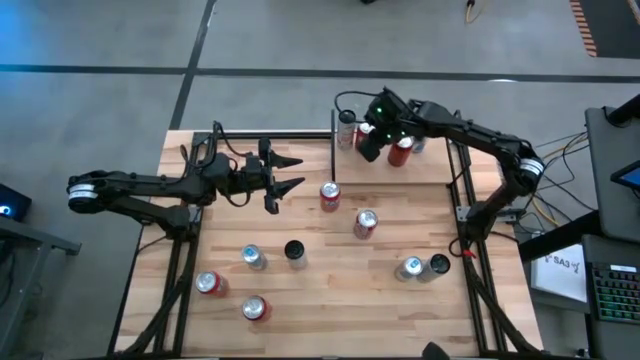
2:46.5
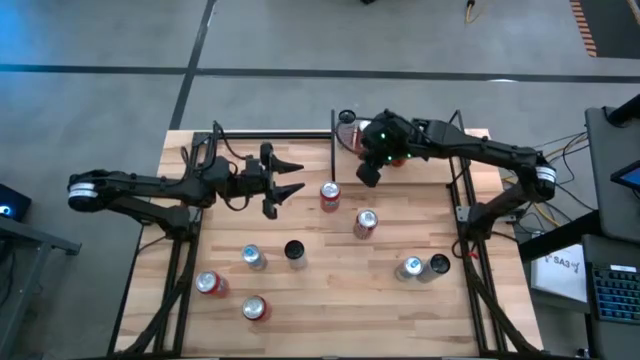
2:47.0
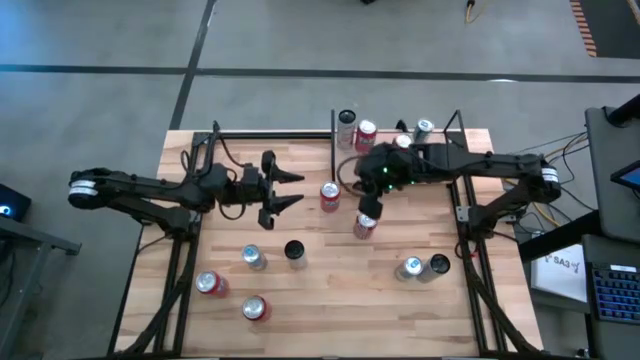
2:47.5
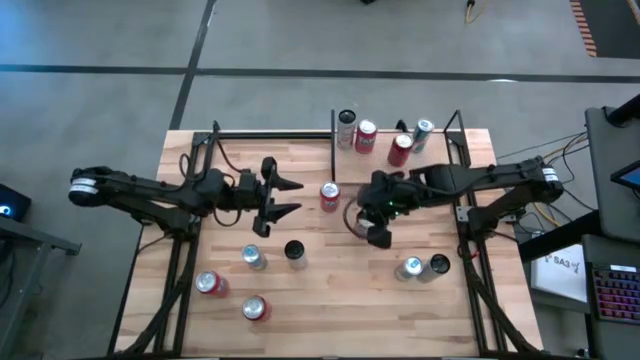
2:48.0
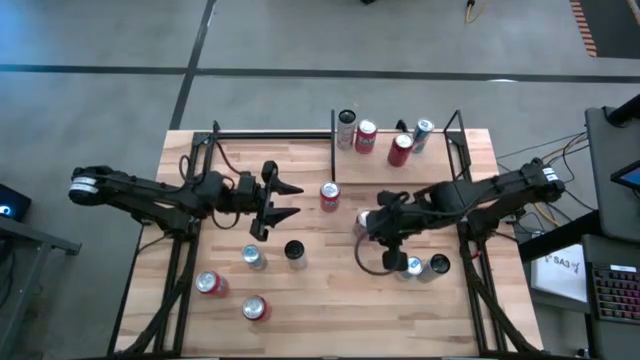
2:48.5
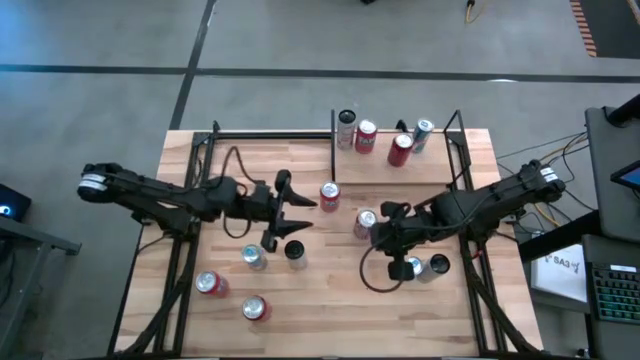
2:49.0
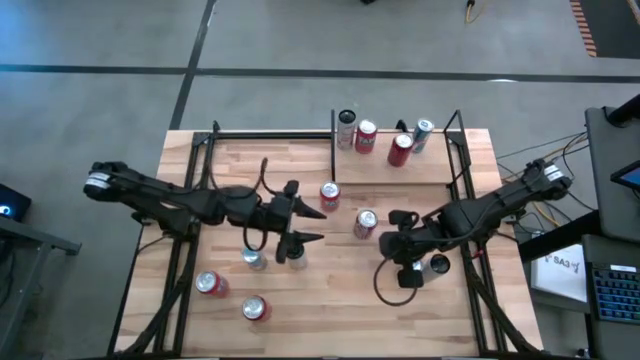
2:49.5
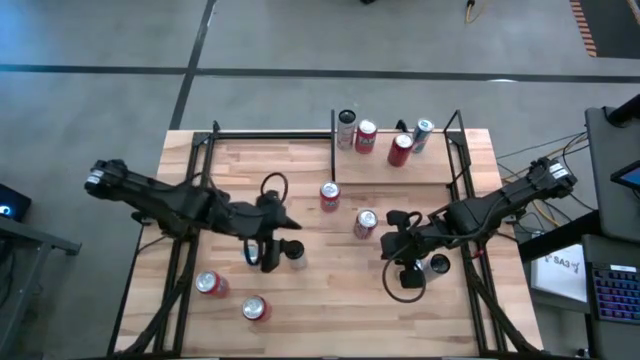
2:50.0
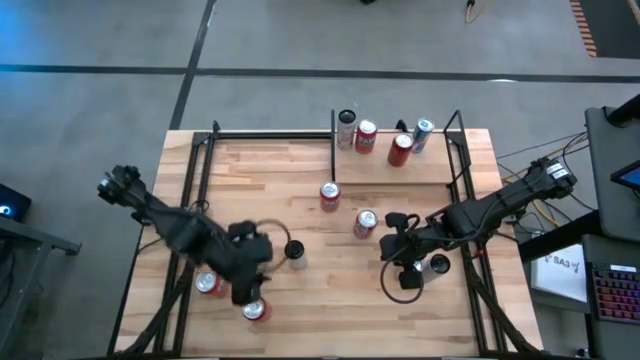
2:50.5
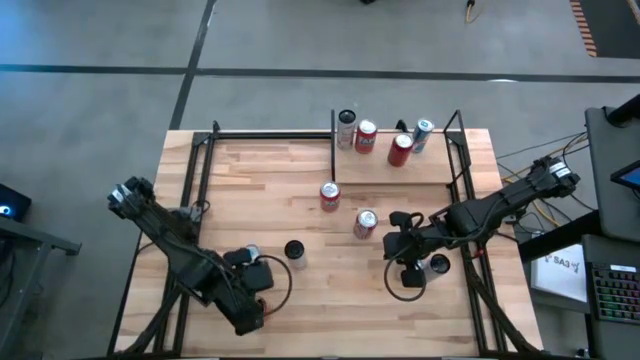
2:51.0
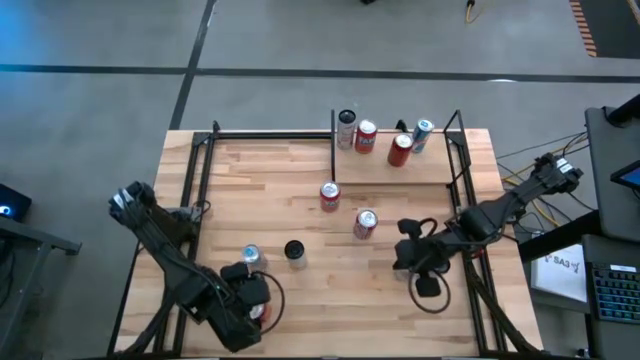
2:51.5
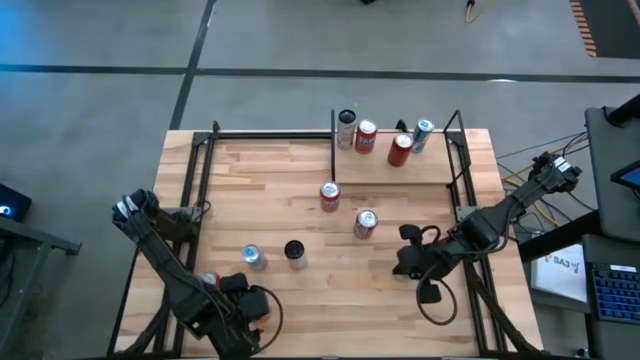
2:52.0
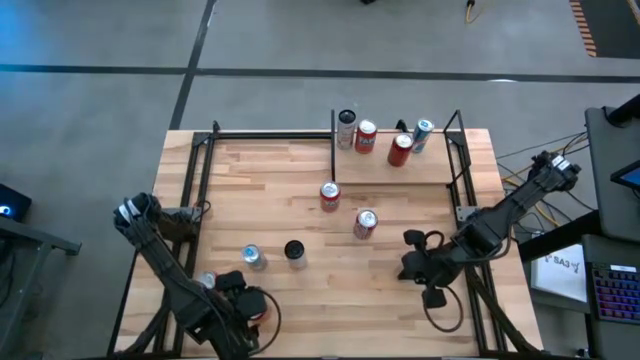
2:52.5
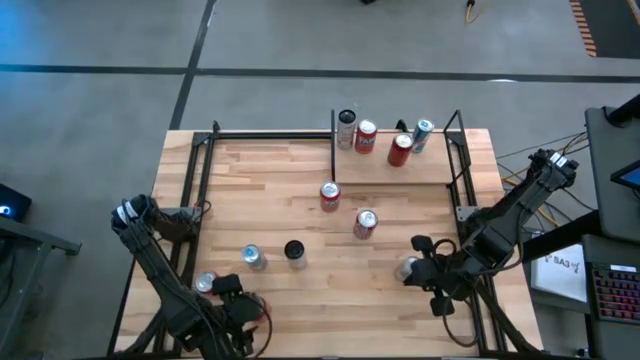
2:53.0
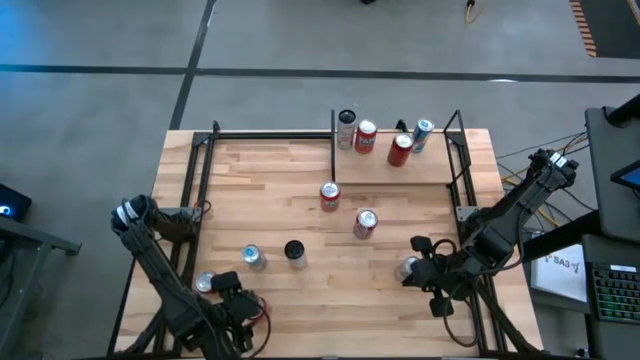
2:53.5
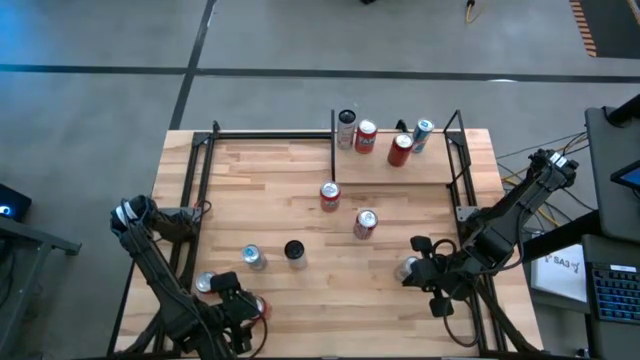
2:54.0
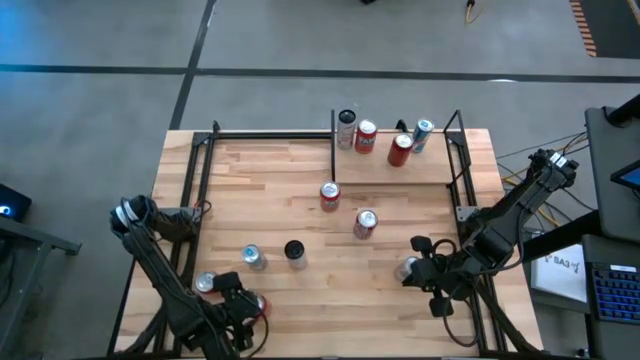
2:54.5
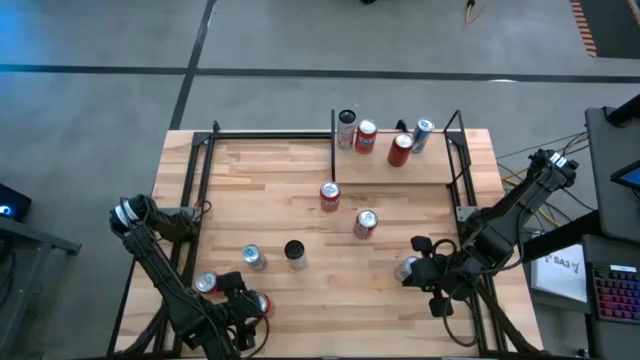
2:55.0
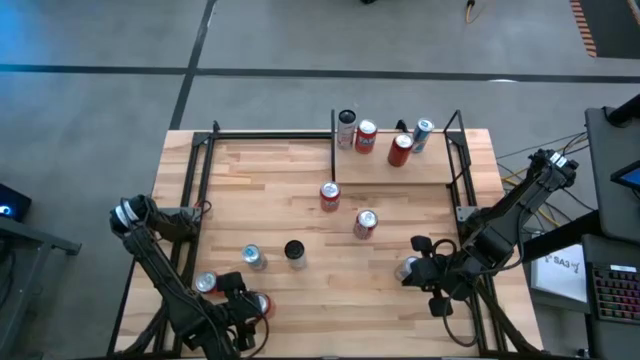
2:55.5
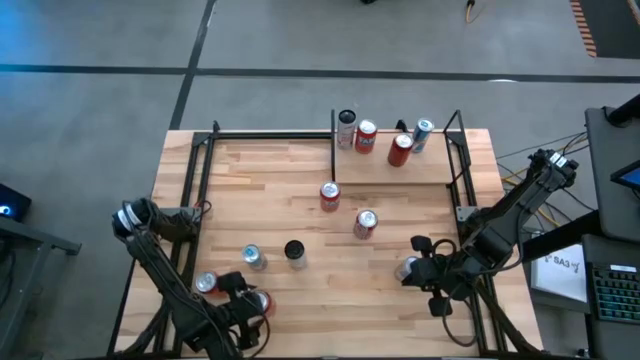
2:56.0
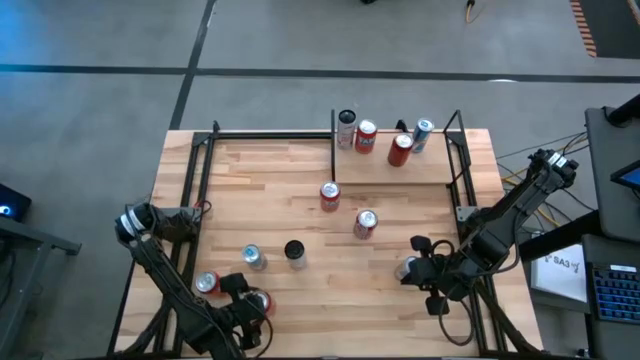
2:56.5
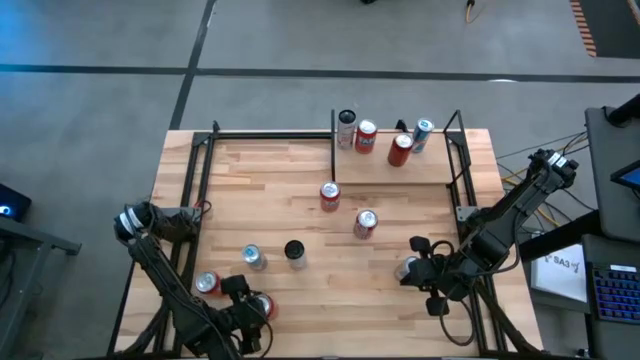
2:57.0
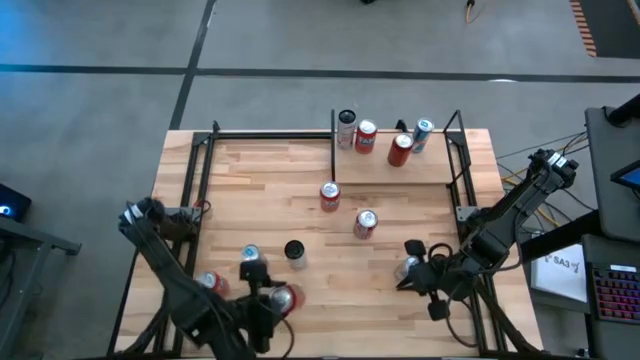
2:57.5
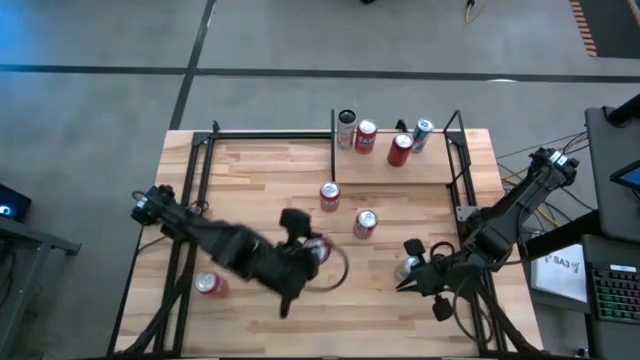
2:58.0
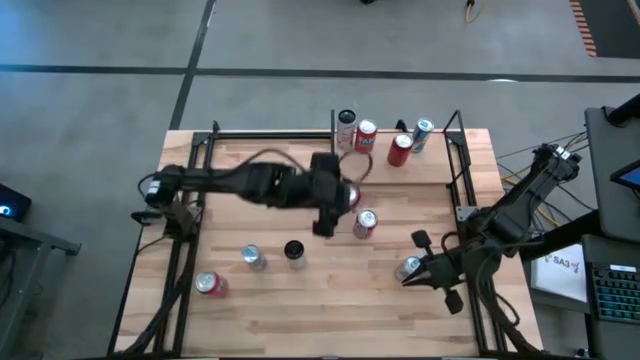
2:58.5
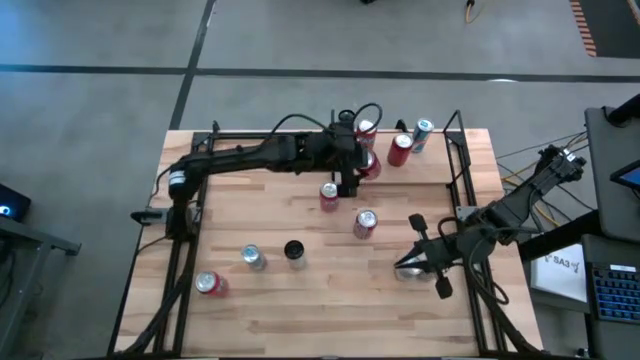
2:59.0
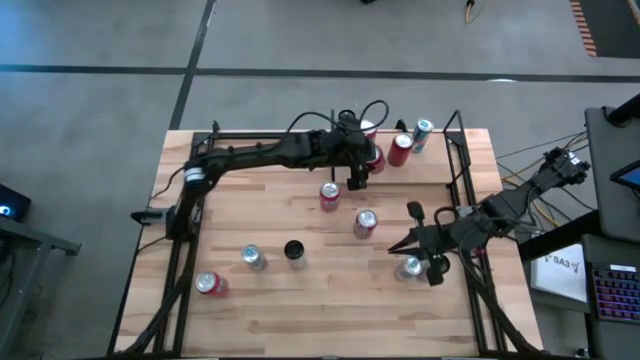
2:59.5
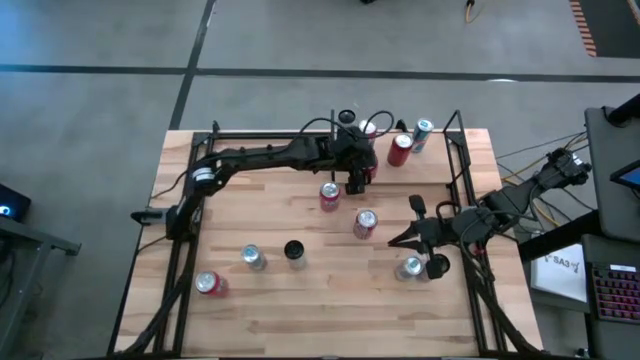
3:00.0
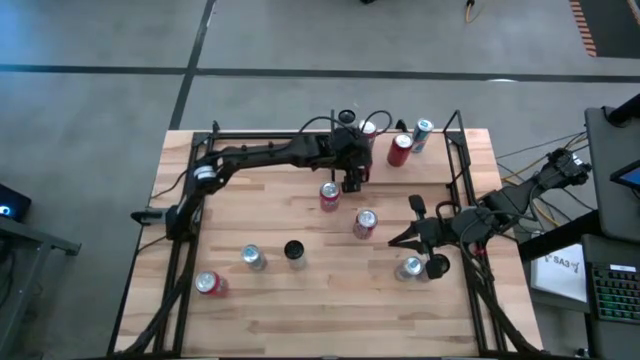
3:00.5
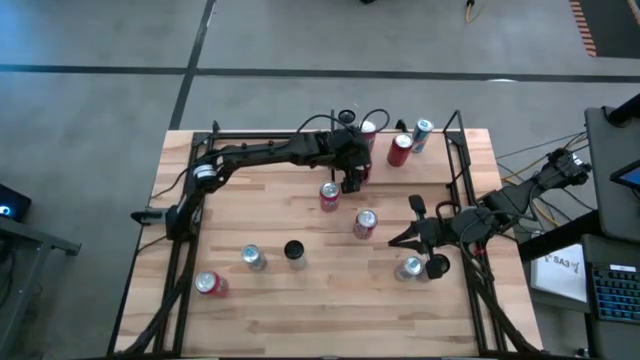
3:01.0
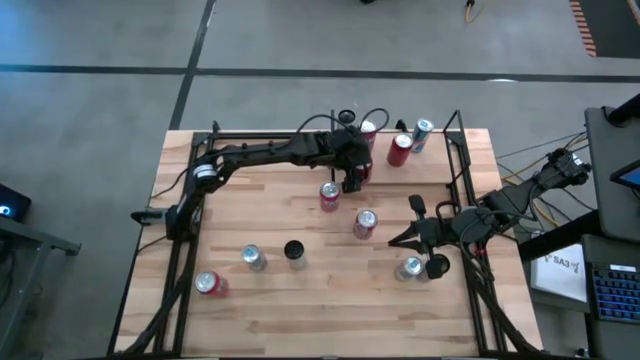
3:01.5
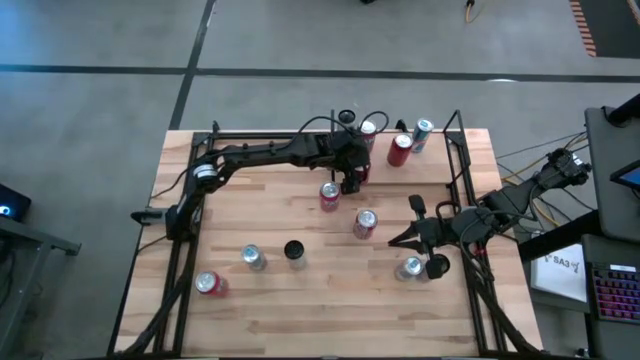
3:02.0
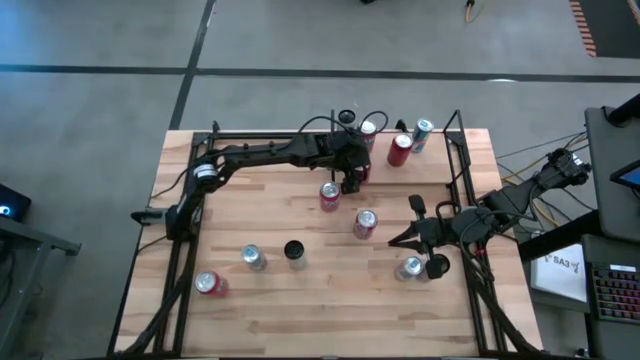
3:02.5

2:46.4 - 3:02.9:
Task: Place canned beverage on shelf
Put the red black soda can on the shelf aligned with the other red black soda can

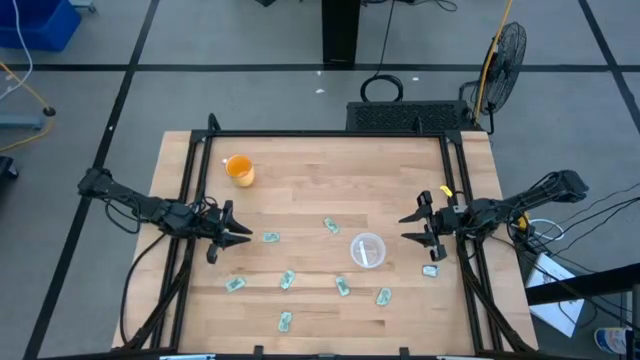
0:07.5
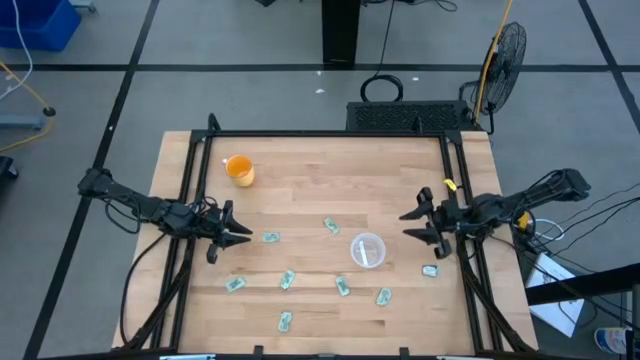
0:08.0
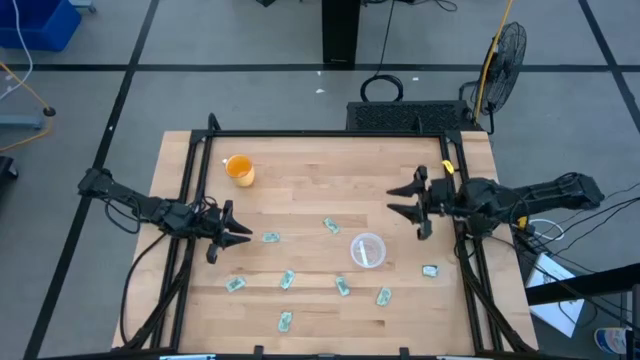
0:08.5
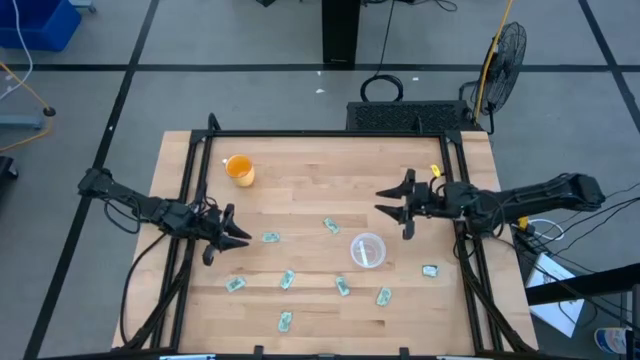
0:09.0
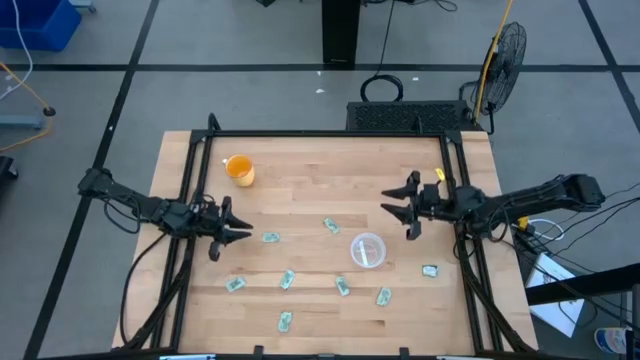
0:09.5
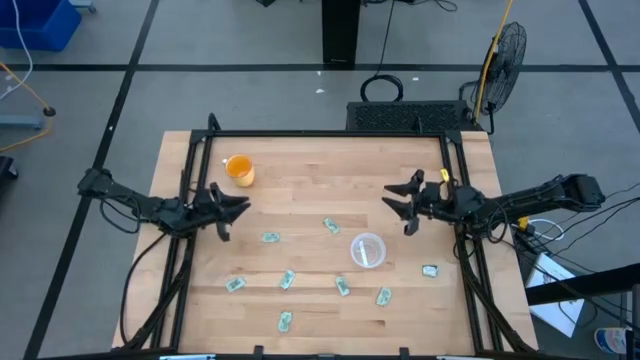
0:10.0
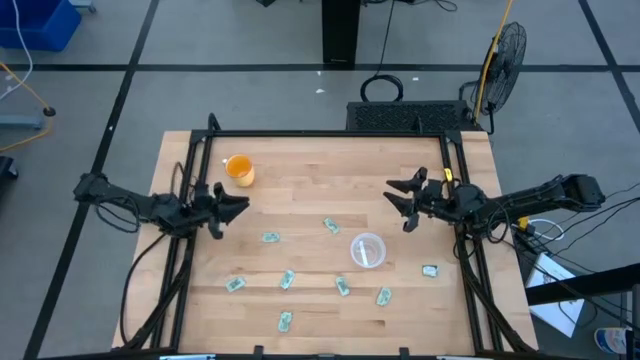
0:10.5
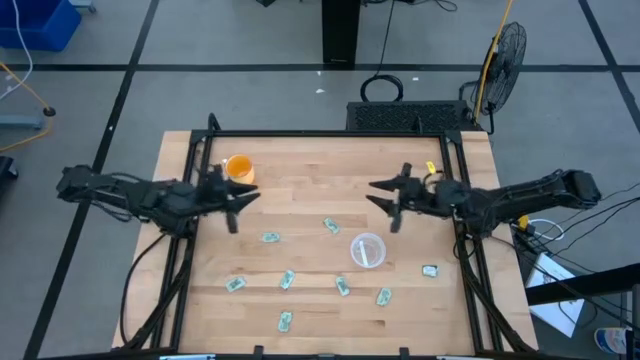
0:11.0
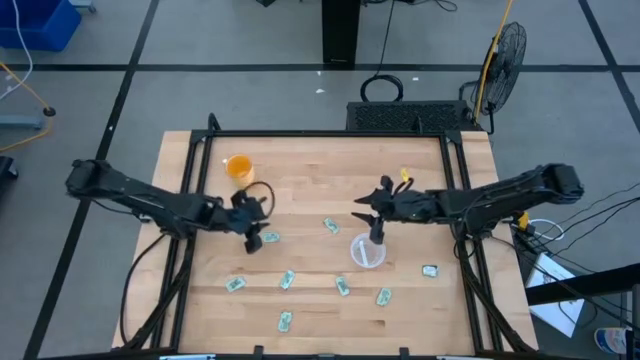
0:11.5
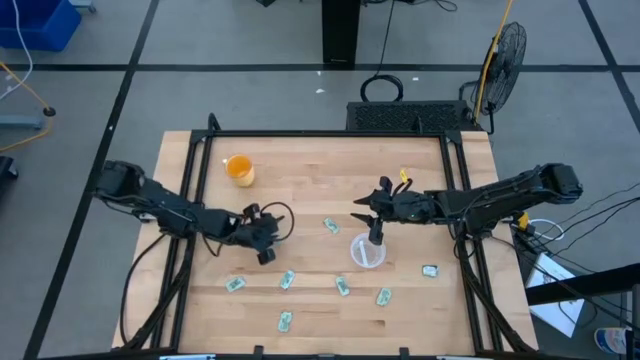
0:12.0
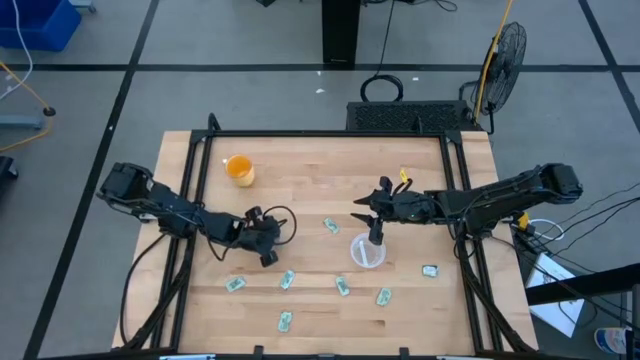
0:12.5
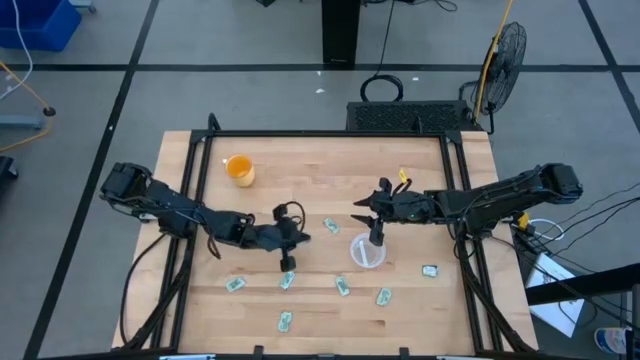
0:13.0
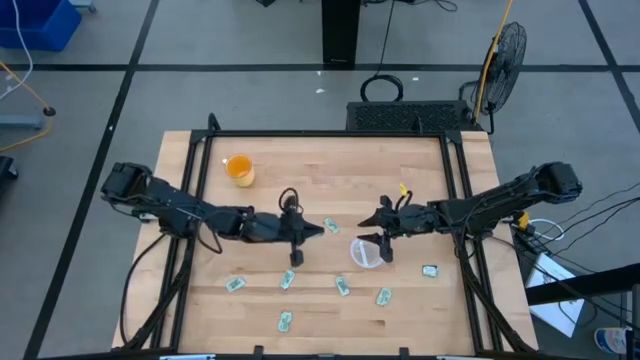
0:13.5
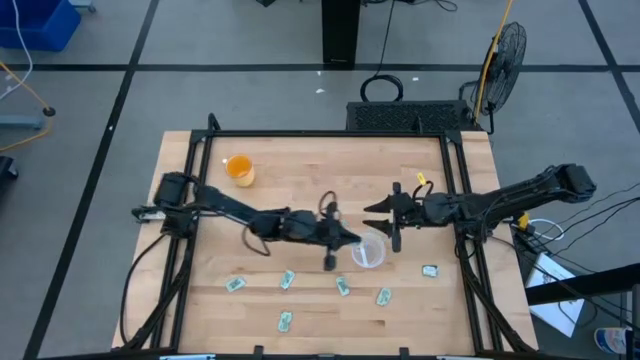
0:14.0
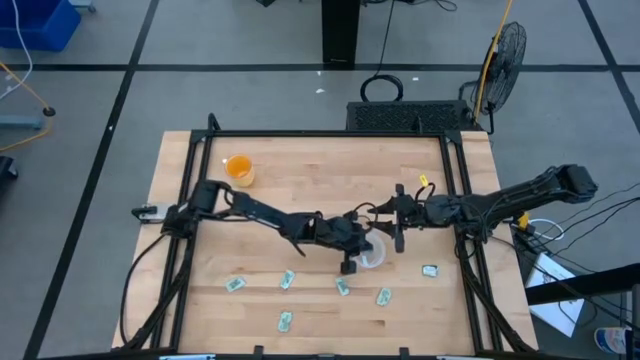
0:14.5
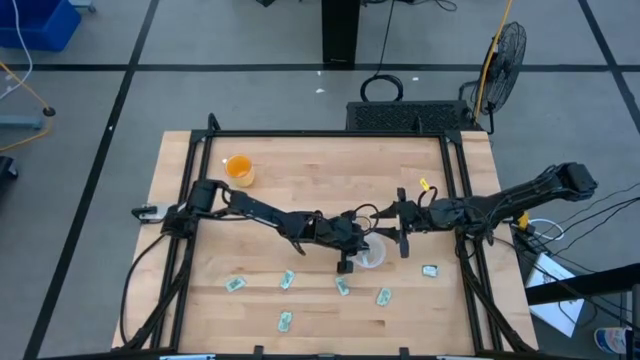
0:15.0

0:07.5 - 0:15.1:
Task: Pick and place Stevia / Truvia into bins
Put the stevia packet into the transparent container
